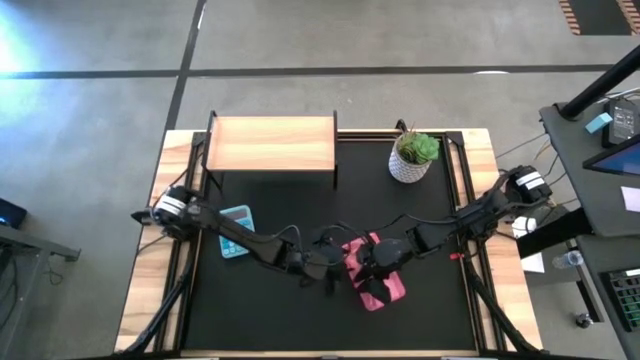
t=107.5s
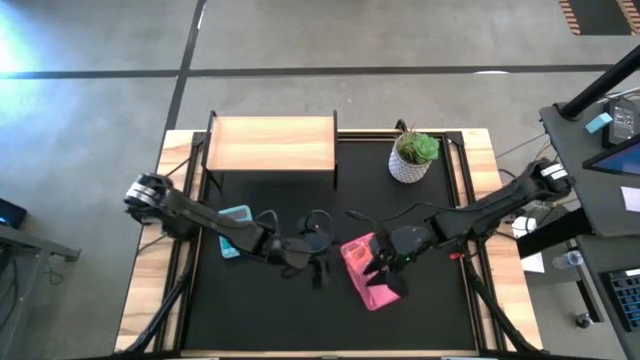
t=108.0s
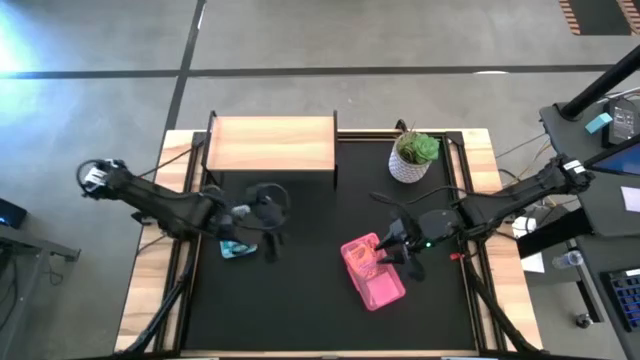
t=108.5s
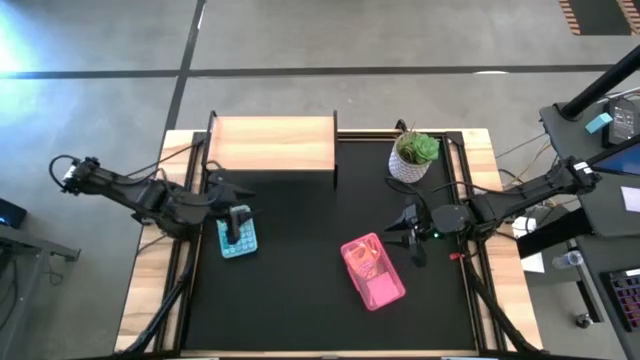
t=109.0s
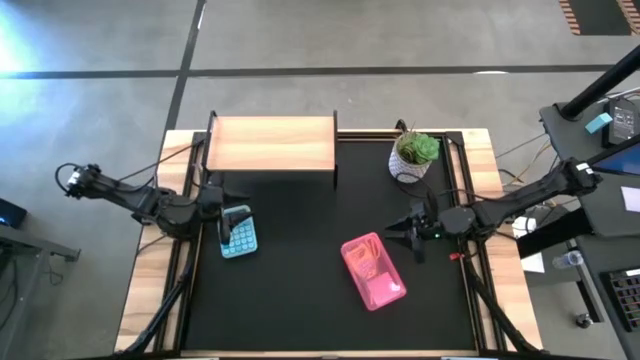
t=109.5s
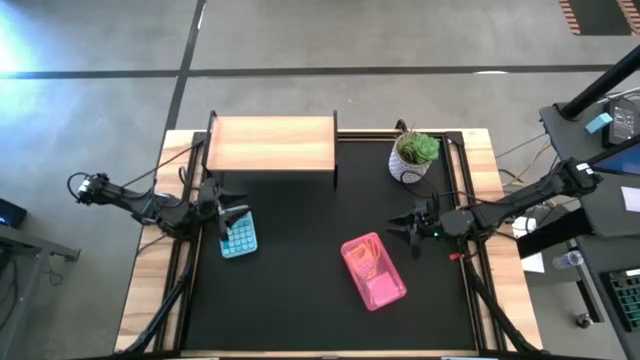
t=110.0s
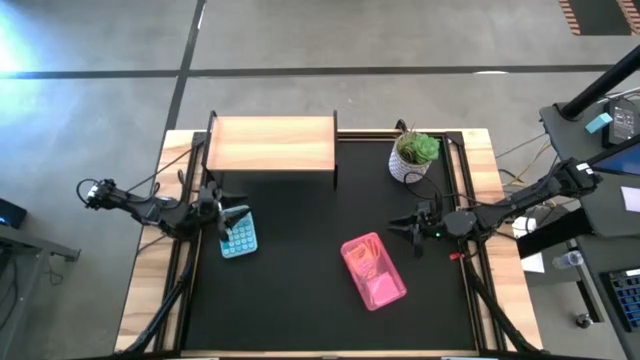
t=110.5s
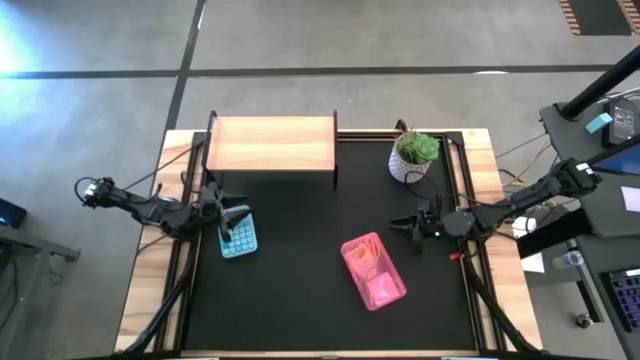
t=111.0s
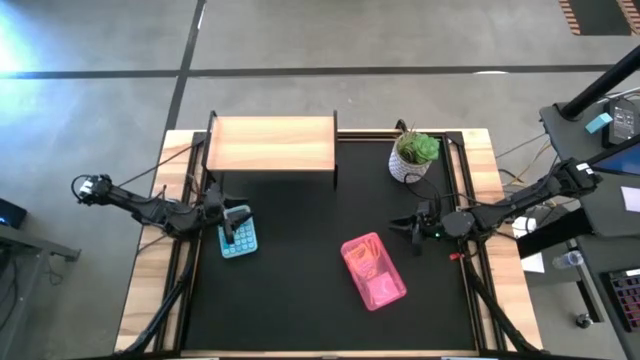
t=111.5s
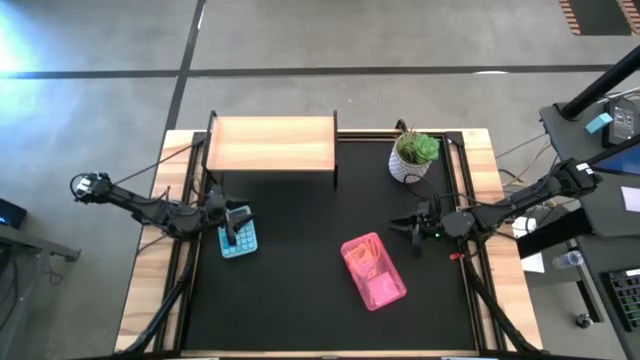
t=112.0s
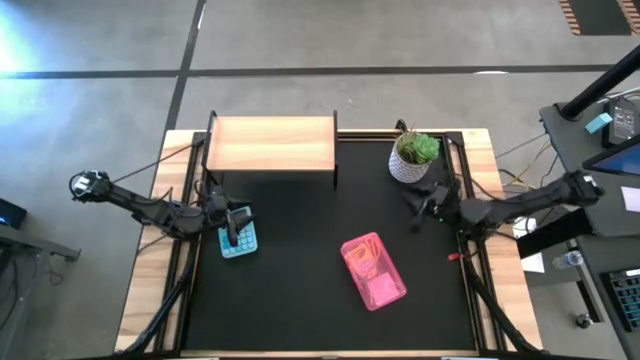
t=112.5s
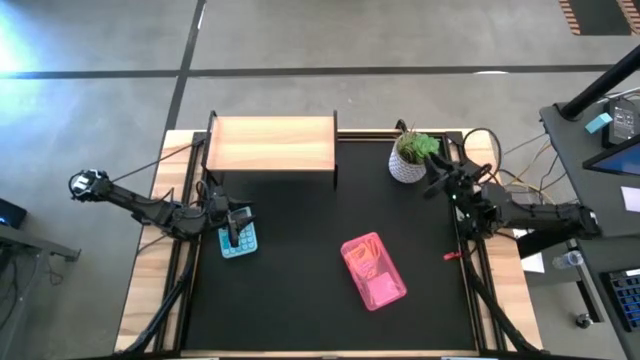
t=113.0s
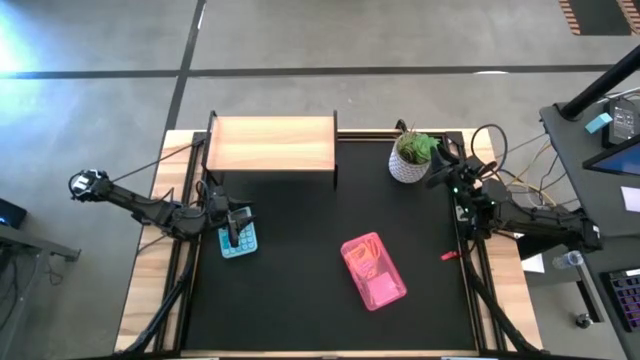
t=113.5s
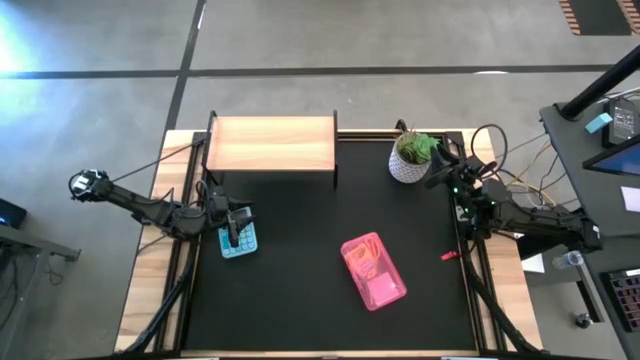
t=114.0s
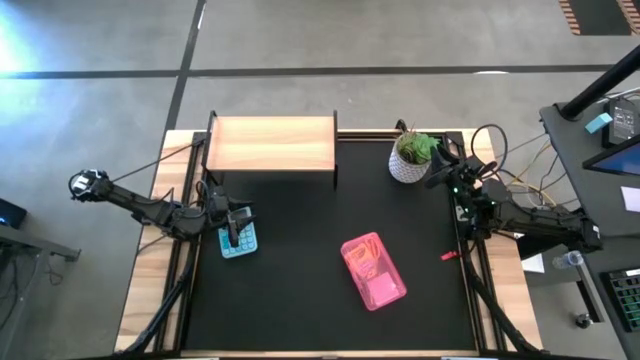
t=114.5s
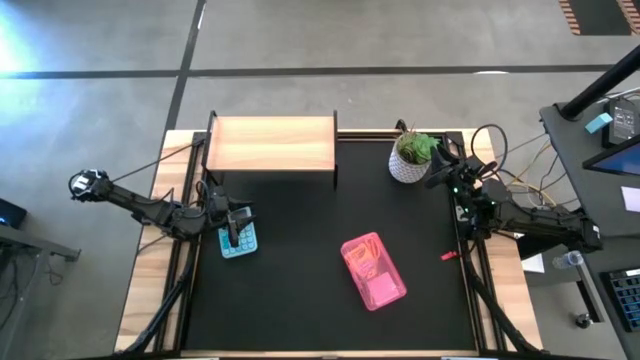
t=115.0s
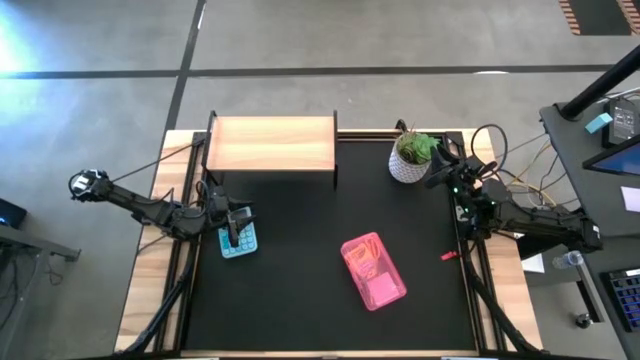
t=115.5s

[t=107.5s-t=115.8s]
Task: Pack school essentials
Return to Home Position

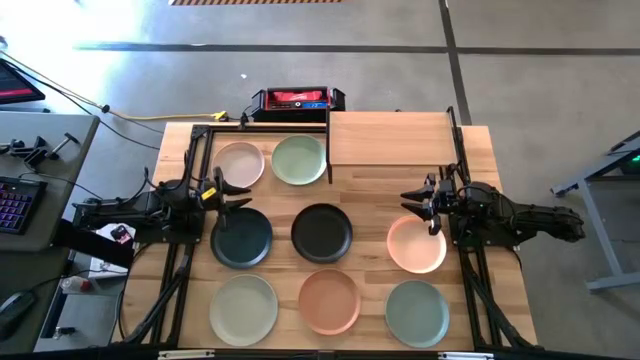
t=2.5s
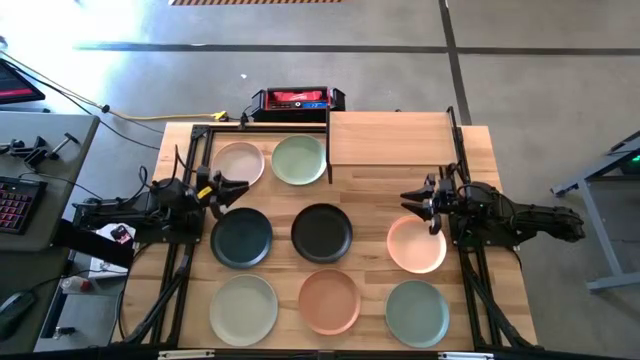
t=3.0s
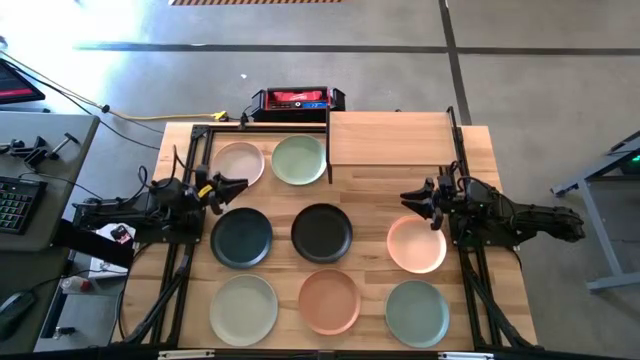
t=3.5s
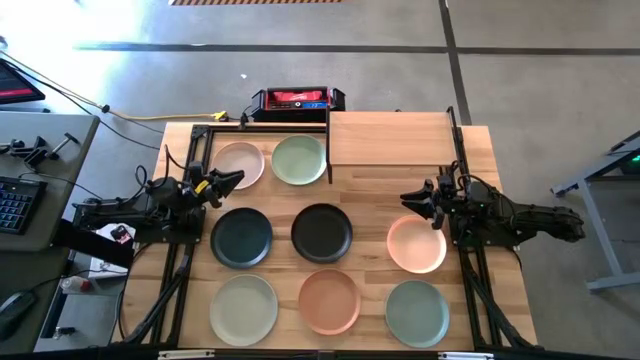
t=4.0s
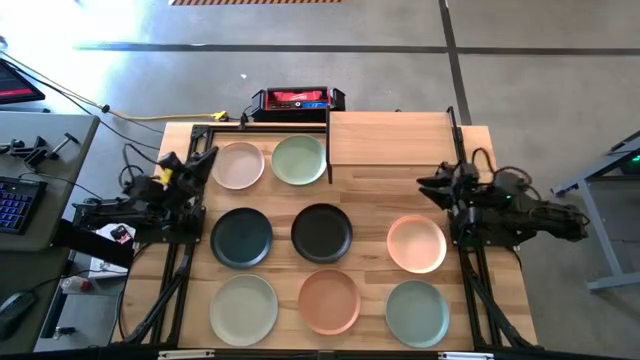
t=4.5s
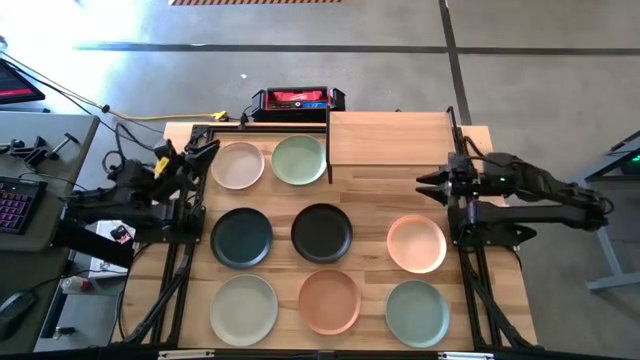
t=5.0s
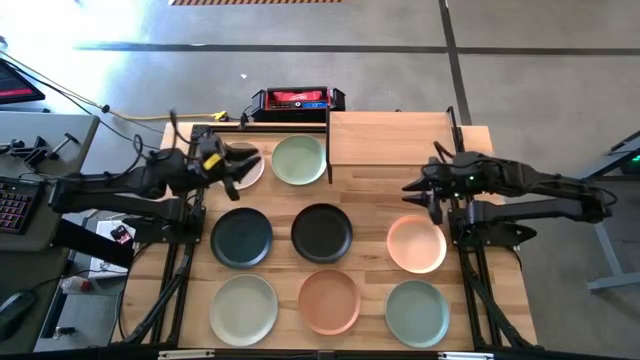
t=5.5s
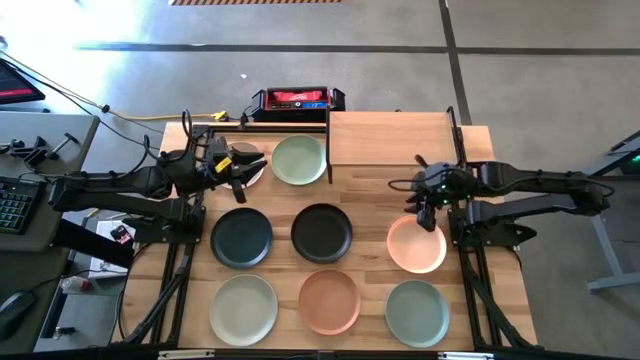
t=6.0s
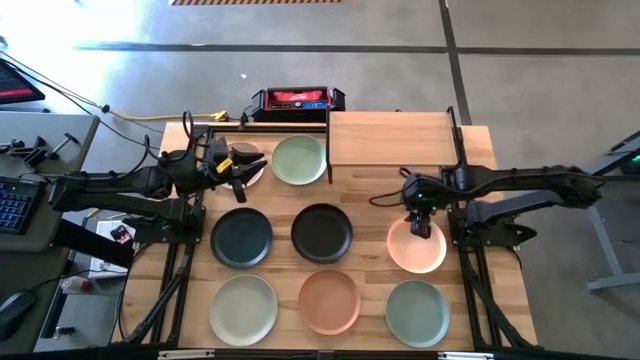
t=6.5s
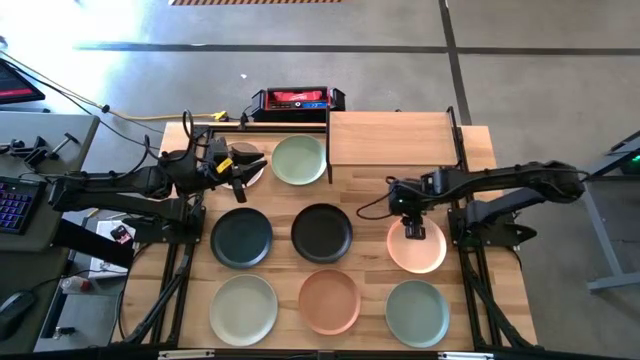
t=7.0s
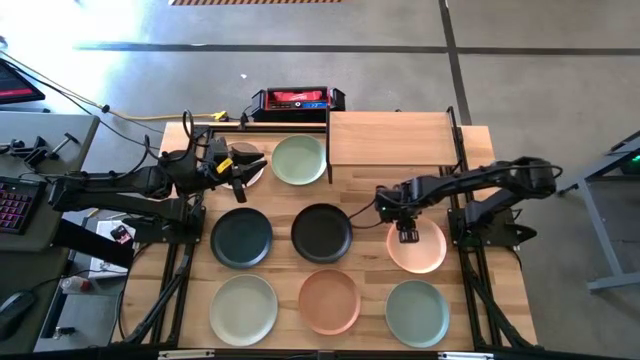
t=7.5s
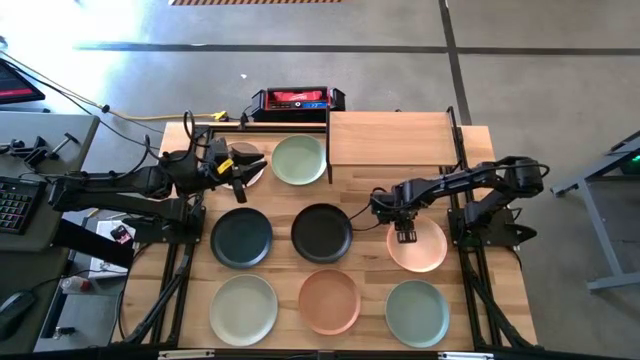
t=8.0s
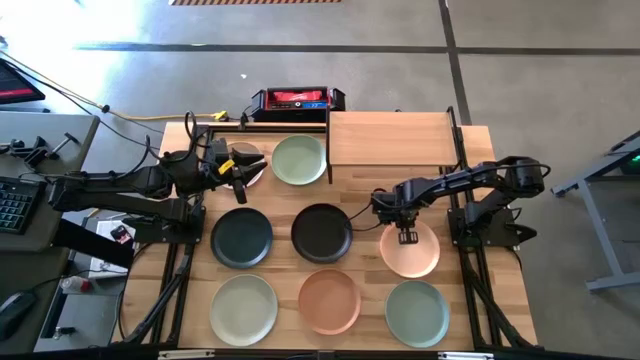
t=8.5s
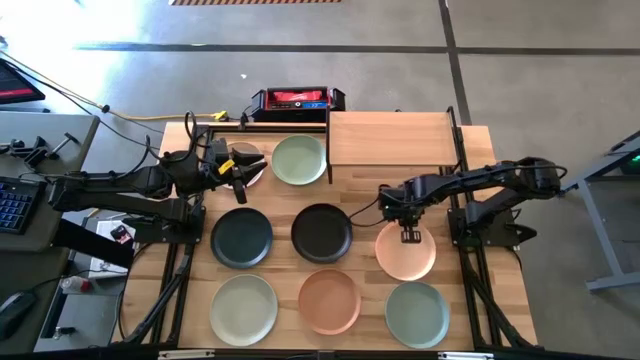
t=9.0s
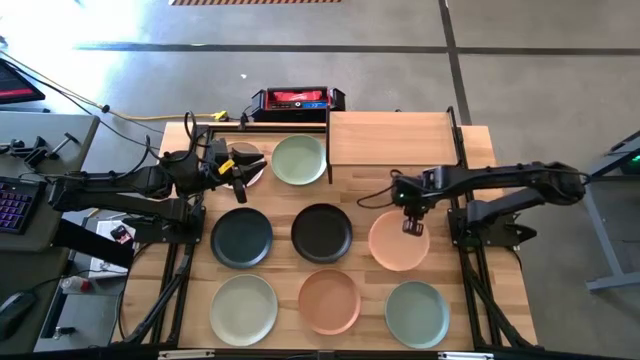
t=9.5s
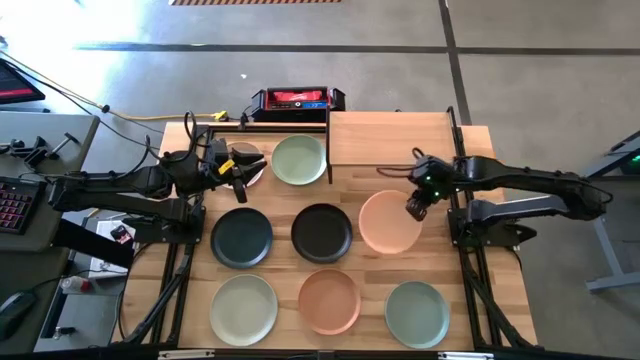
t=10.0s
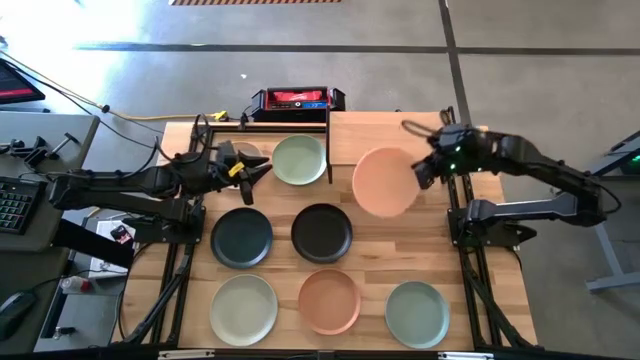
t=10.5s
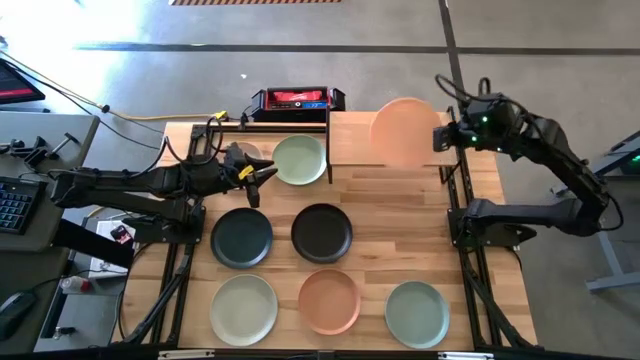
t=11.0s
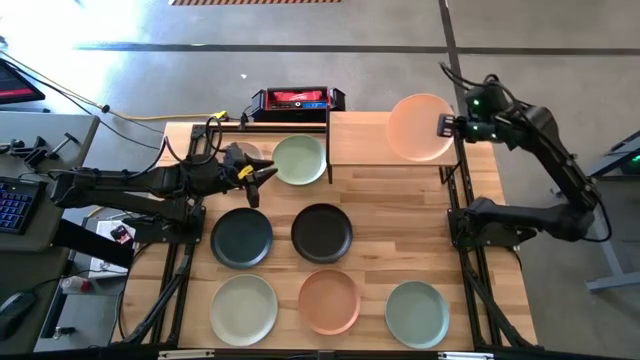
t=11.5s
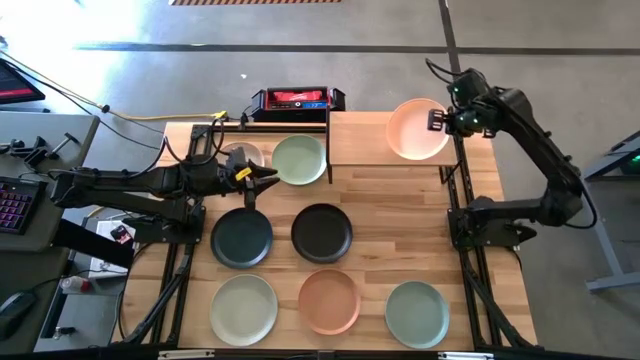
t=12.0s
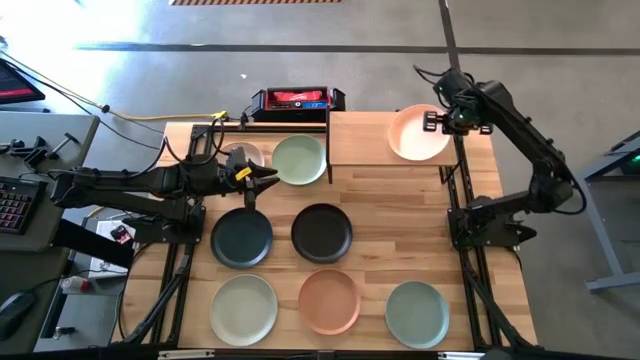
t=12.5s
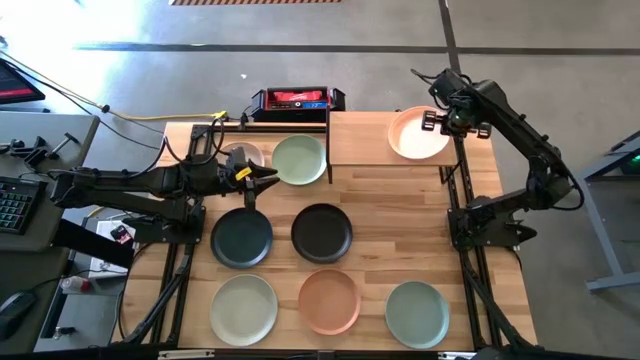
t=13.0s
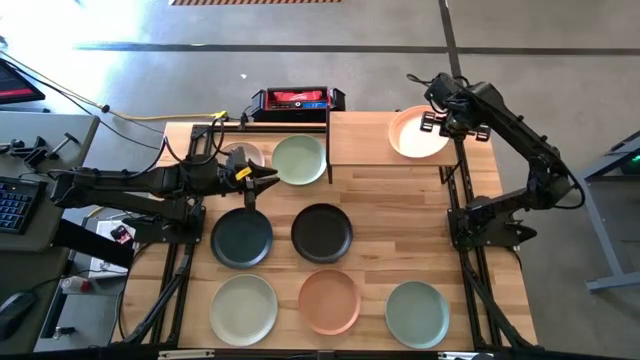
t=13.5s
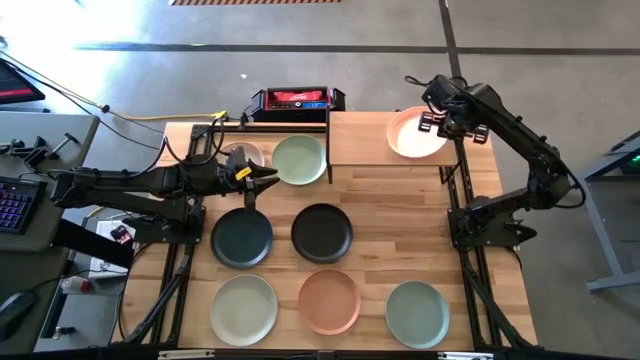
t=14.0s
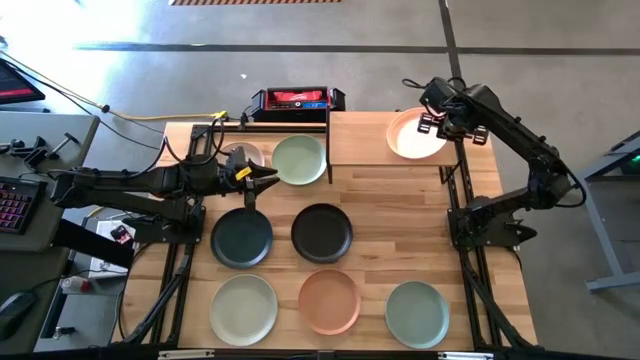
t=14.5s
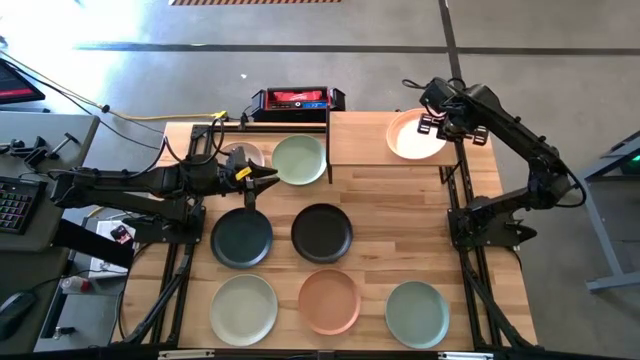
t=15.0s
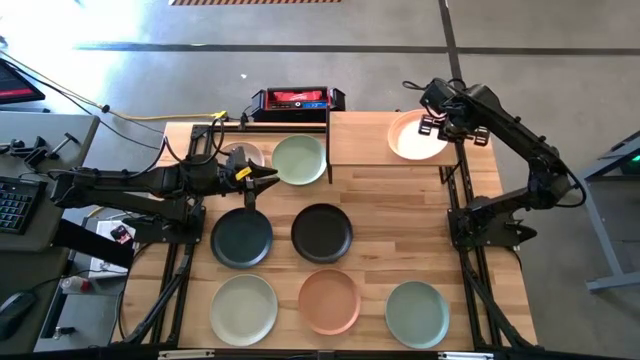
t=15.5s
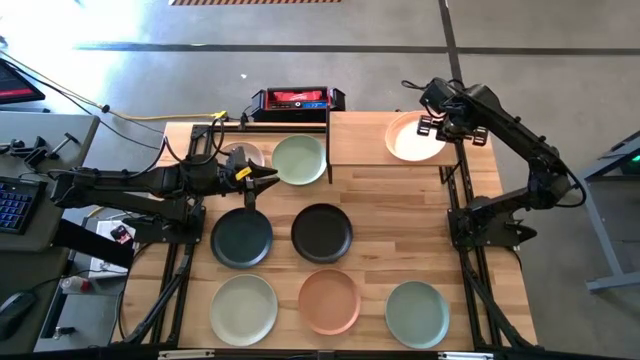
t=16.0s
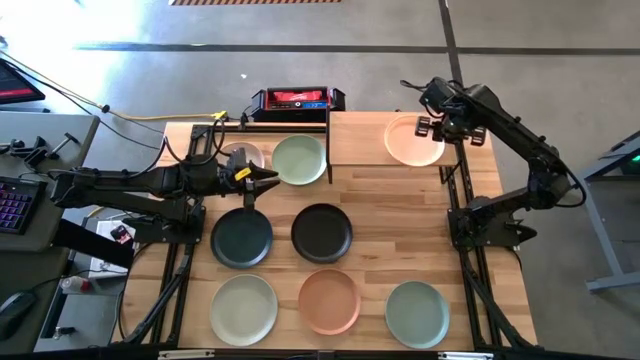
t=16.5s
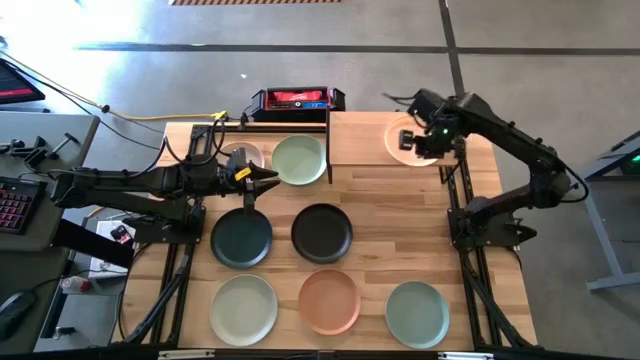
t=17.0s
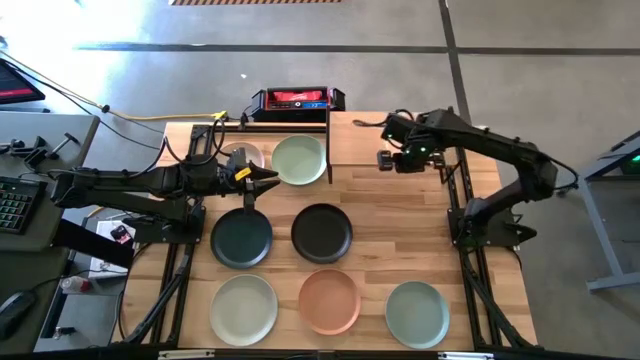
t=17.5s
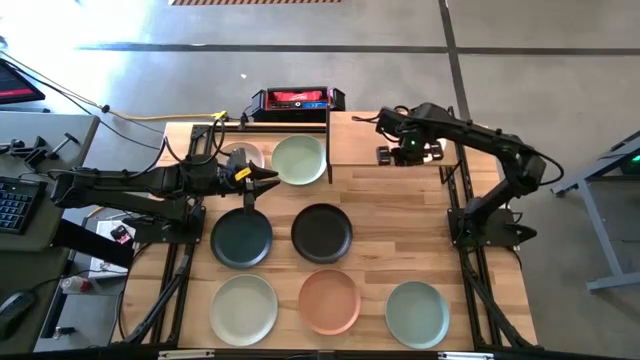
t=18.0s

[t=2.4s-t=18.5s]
Task: Place and stack plates onto a shelf
Put the light orange plate on the shelf
